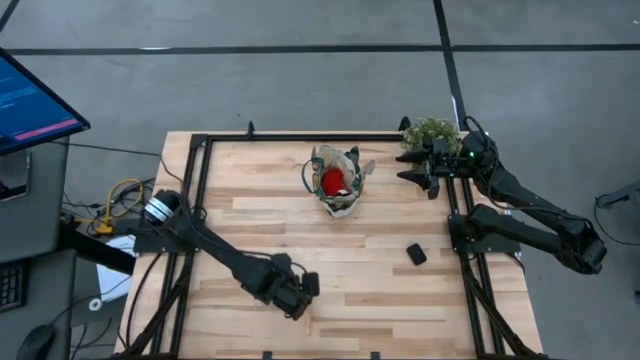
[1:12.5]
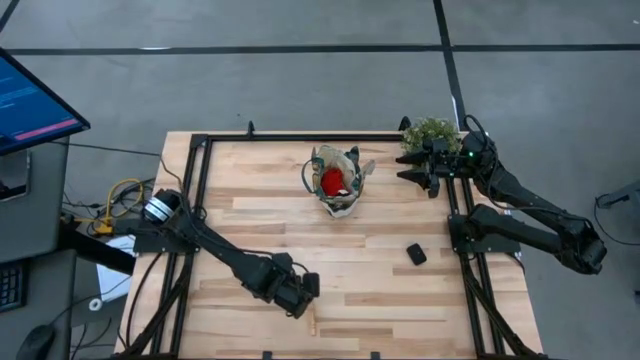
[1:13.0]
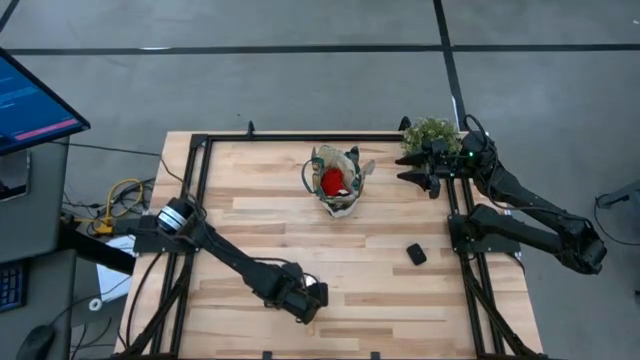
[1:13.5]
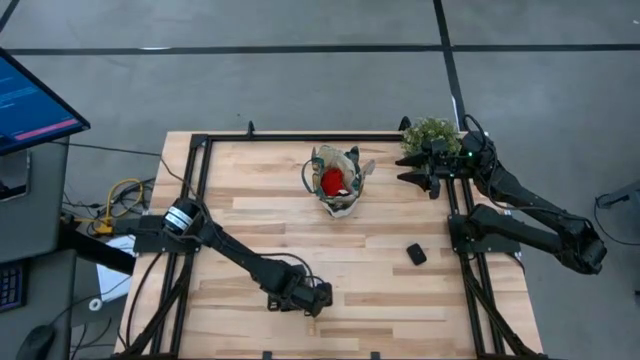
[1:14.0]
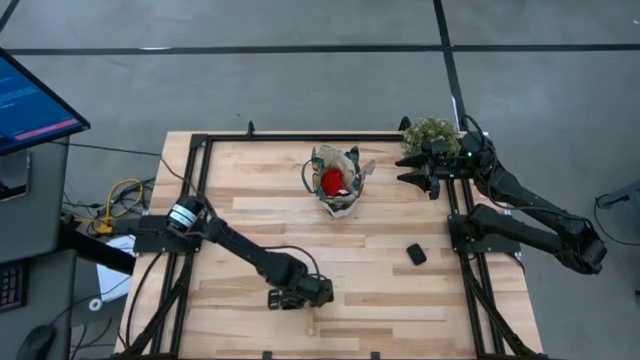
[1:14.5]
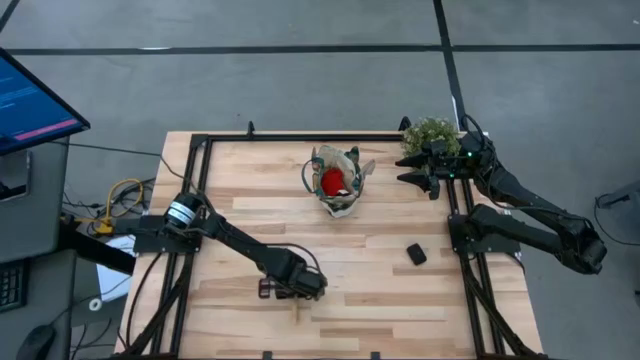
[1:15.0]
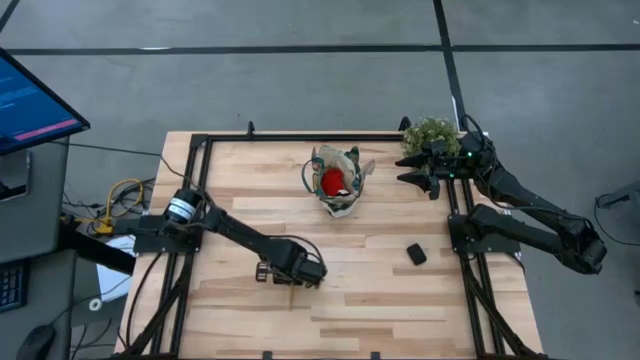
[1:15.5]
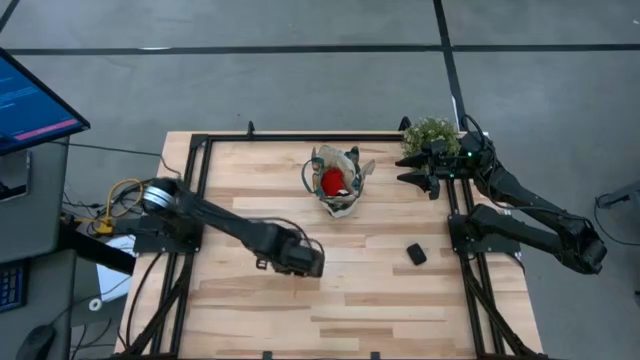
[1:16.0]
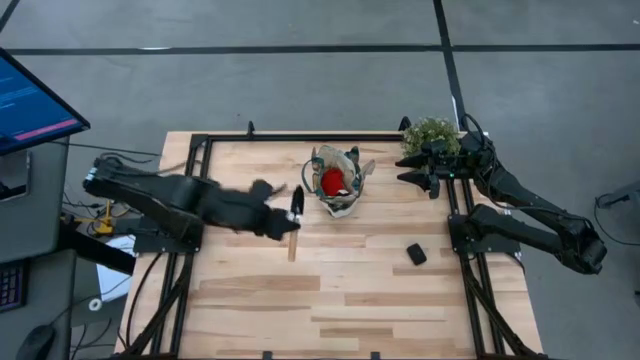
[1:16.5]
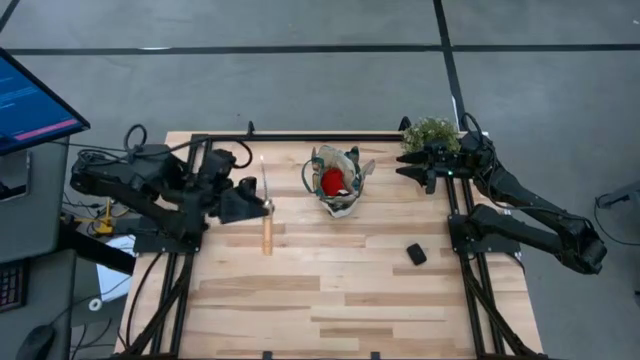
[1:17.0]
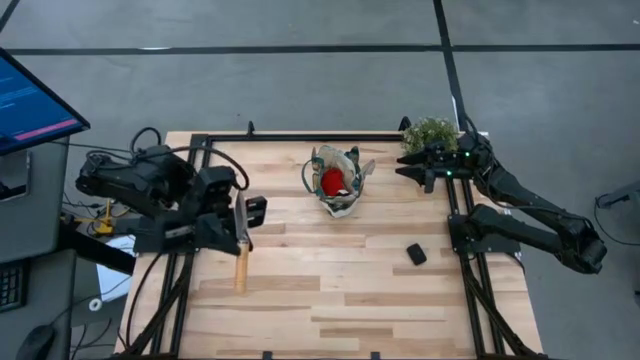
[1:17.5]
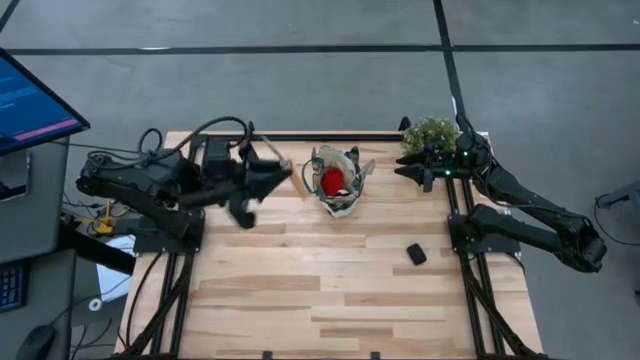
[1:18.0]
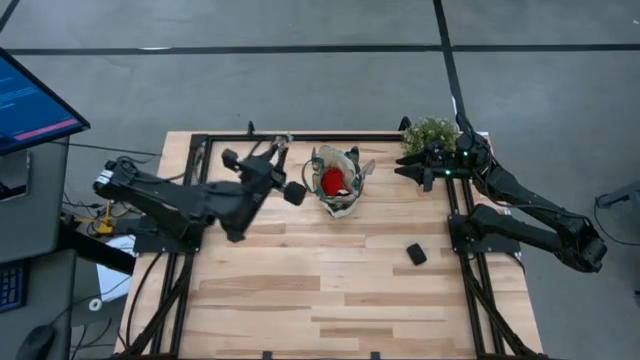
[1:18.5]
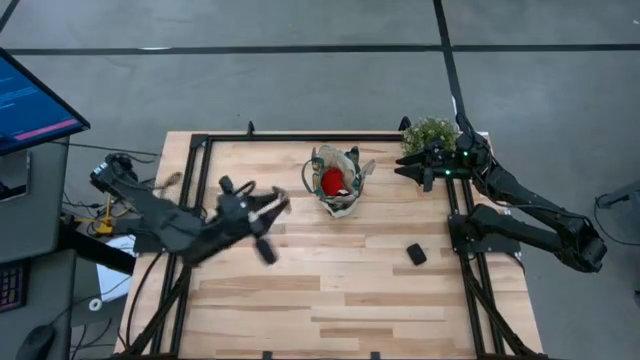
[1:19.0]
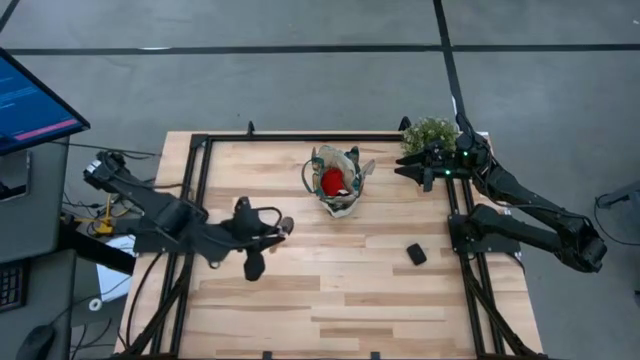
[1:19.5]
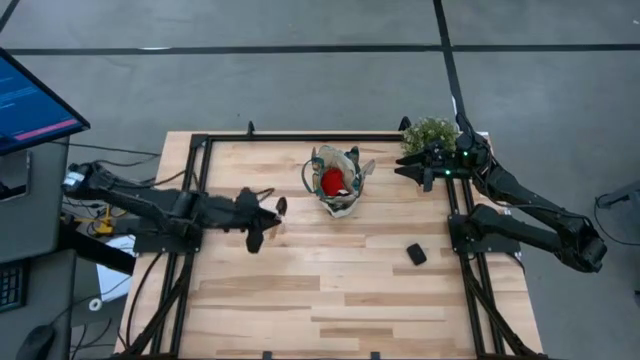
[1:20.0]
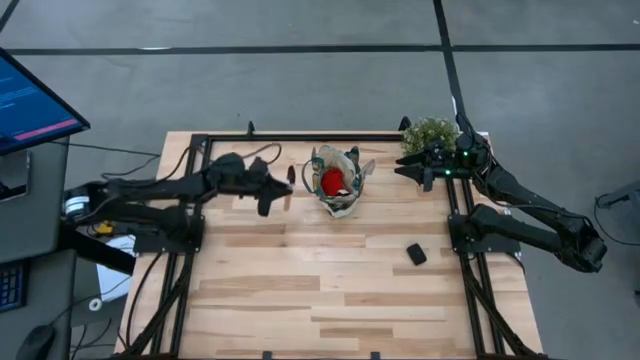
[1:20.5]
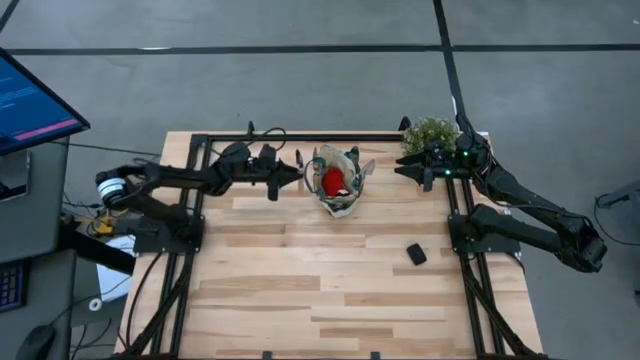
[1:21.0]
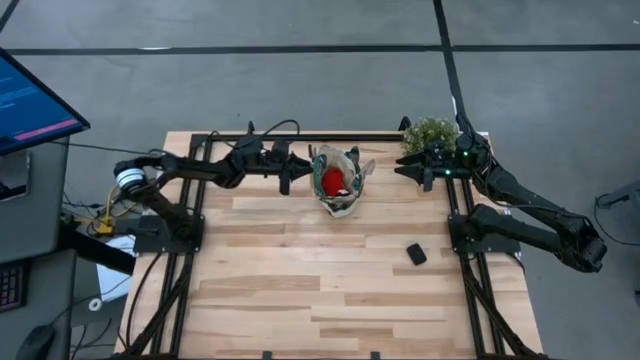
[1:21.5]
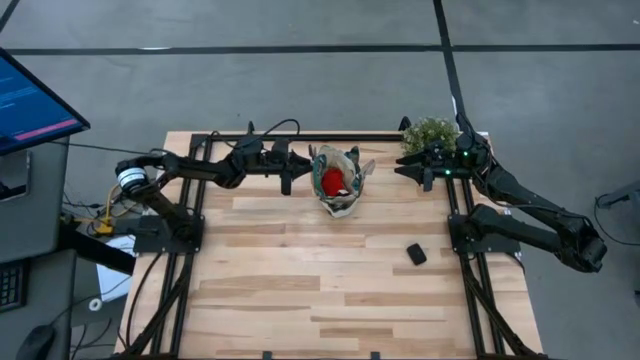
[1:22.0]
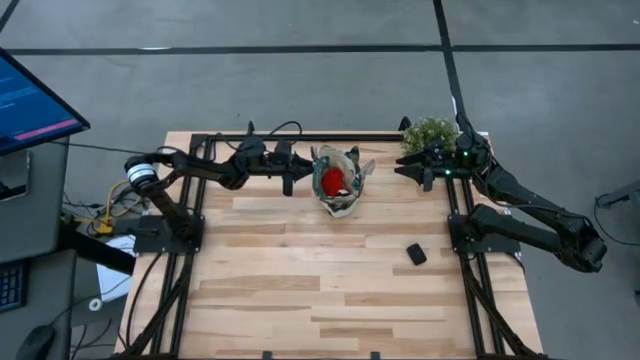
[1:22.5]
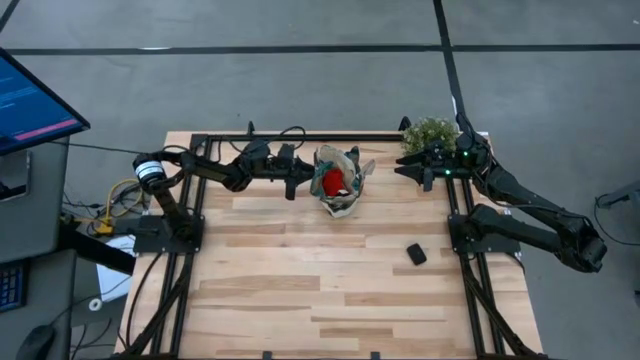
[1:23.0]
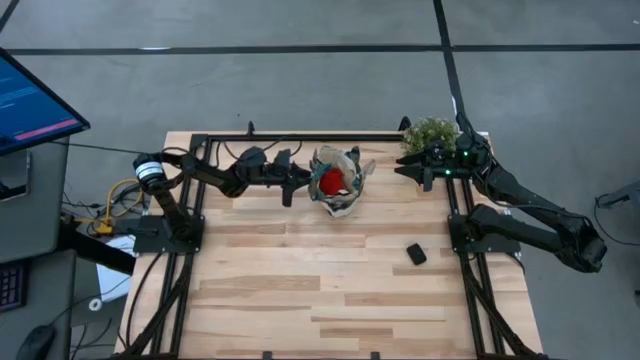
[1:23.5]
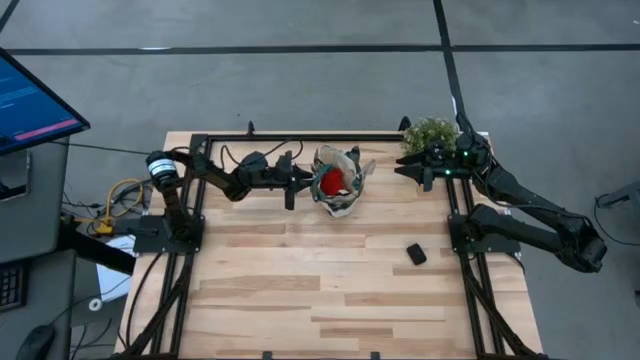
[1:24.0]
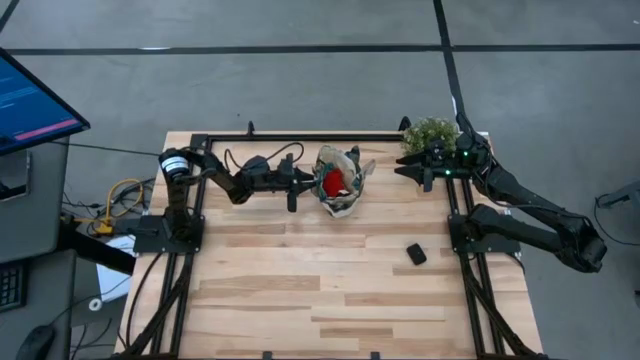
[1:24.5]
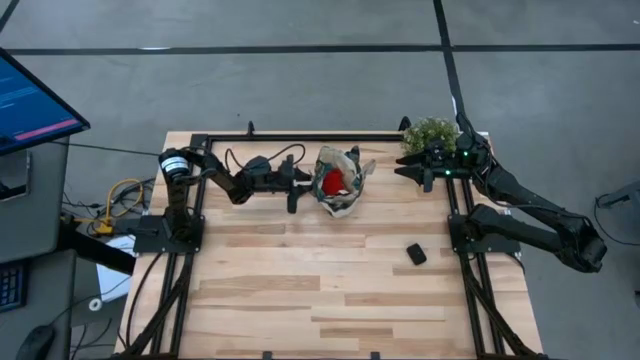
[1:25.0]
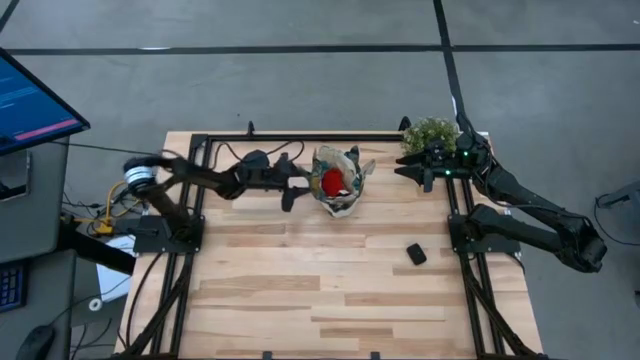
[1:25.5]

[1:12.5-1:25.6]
Task: Pick & Place Garden tools in Gardening bag
Put the brown trowel into the green gardening bag

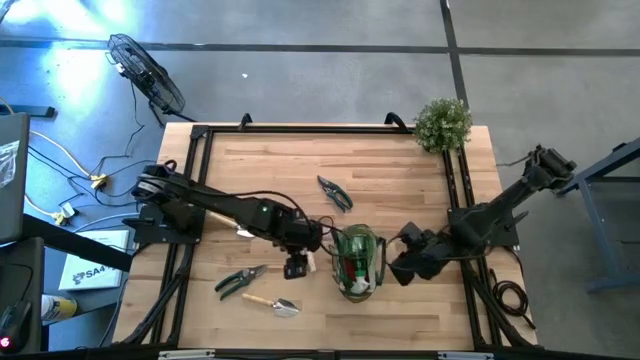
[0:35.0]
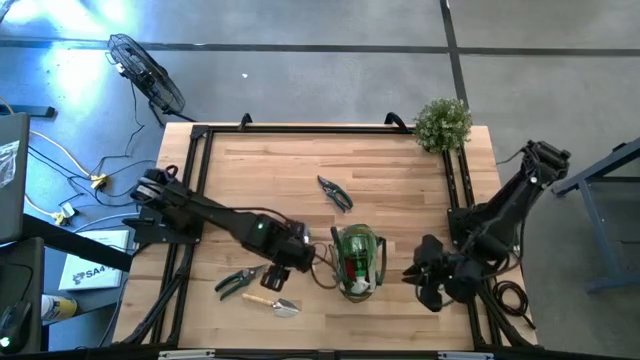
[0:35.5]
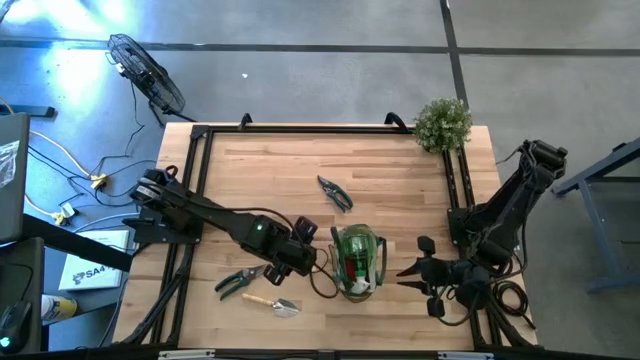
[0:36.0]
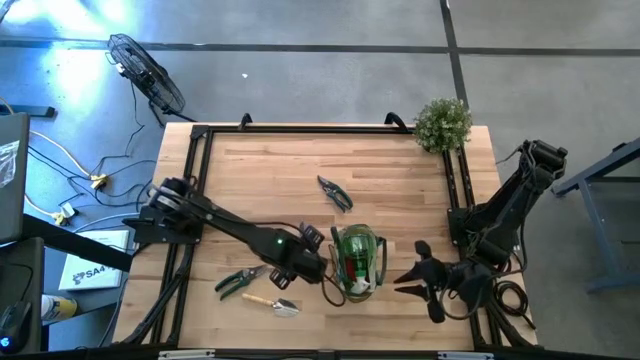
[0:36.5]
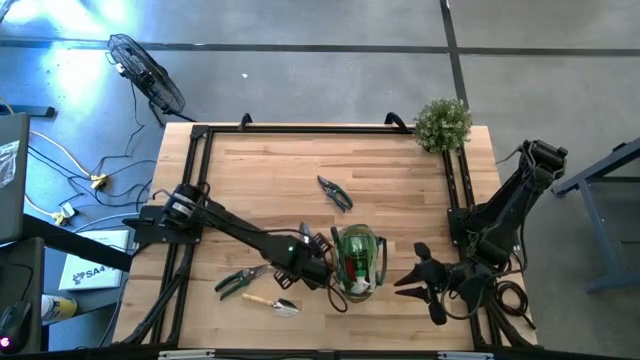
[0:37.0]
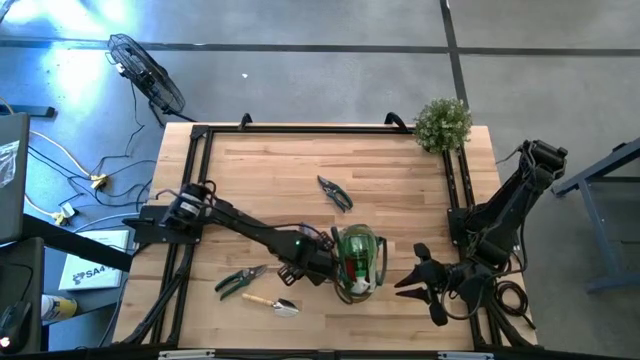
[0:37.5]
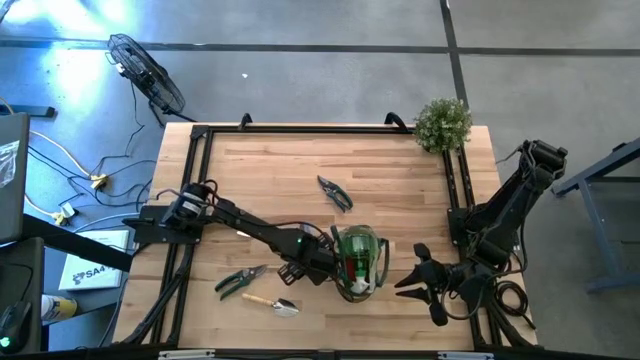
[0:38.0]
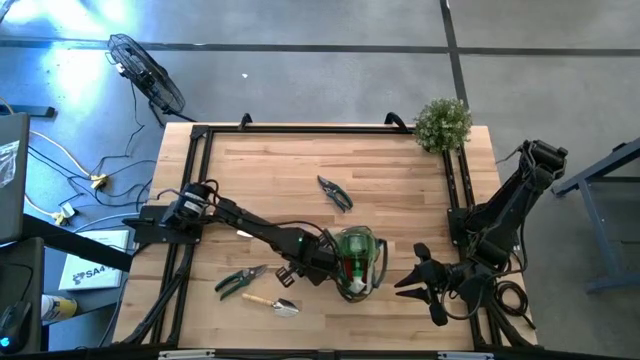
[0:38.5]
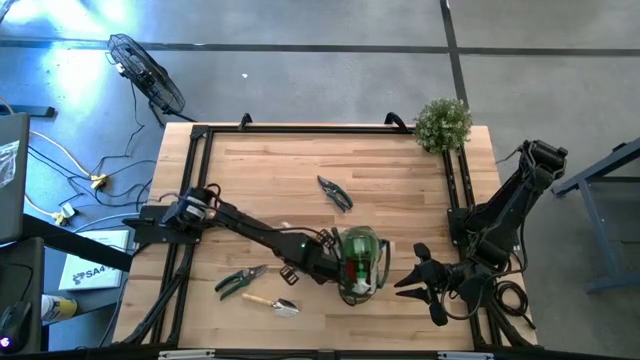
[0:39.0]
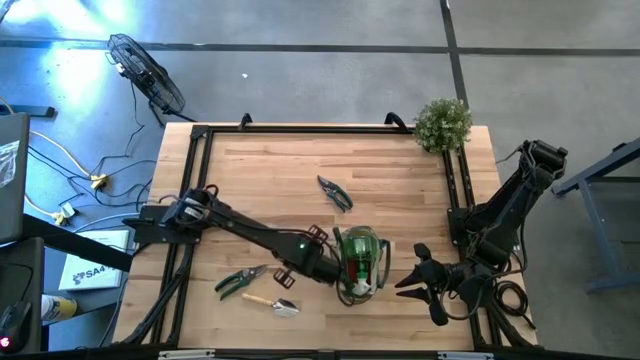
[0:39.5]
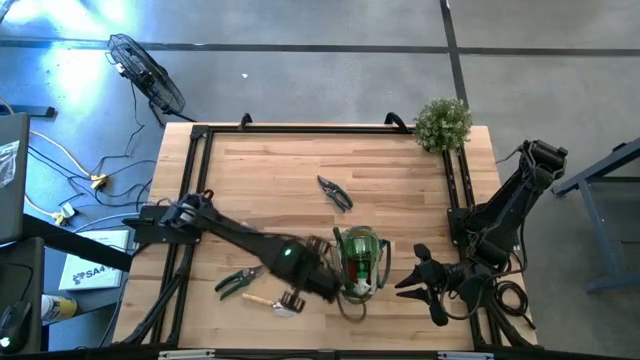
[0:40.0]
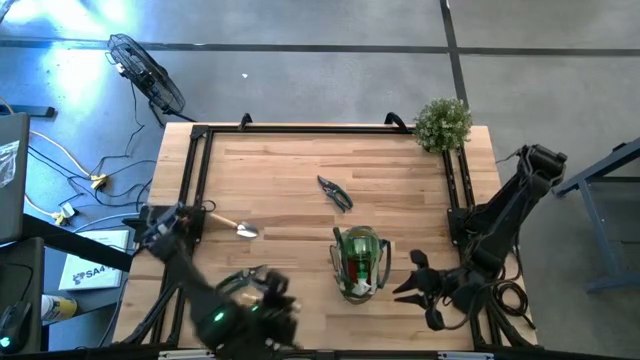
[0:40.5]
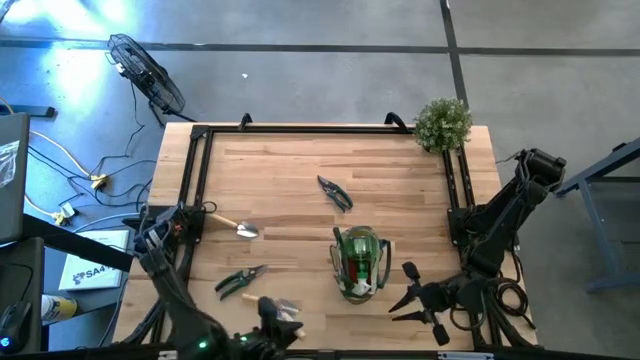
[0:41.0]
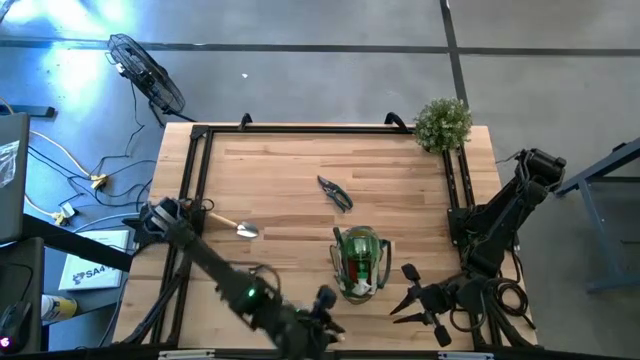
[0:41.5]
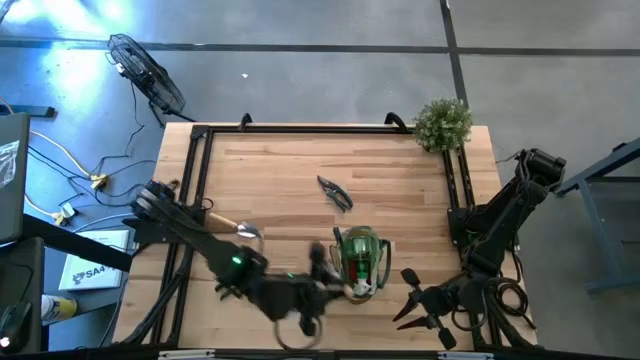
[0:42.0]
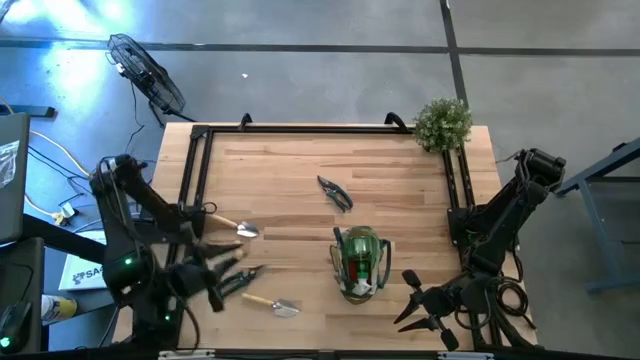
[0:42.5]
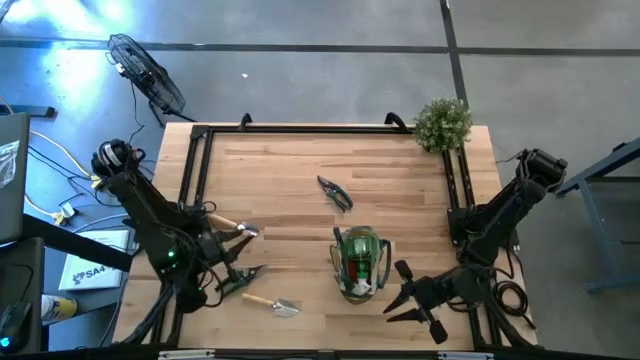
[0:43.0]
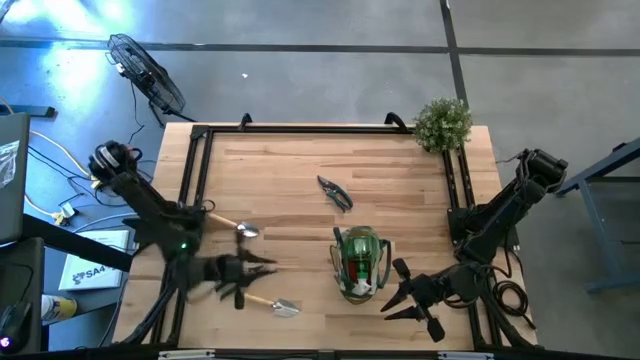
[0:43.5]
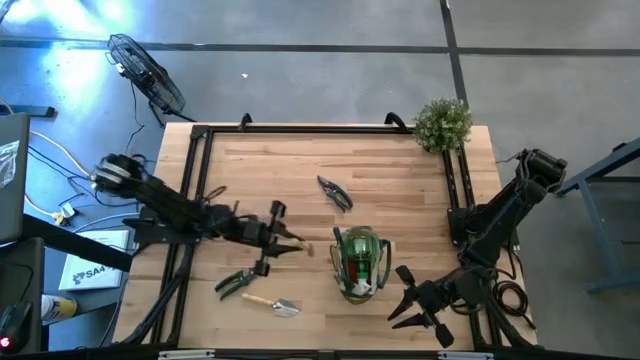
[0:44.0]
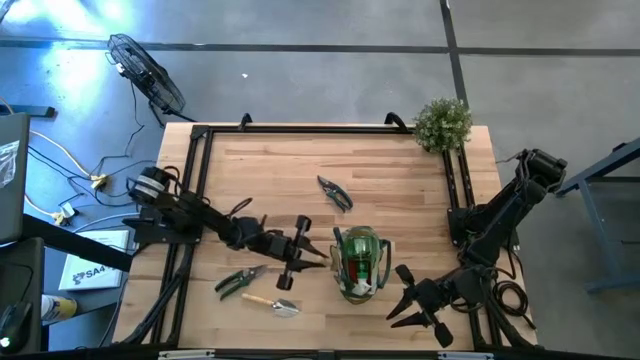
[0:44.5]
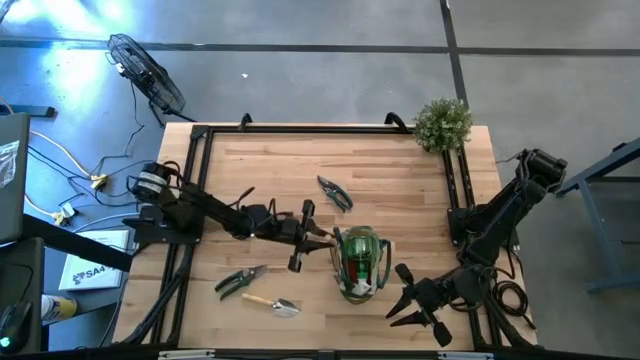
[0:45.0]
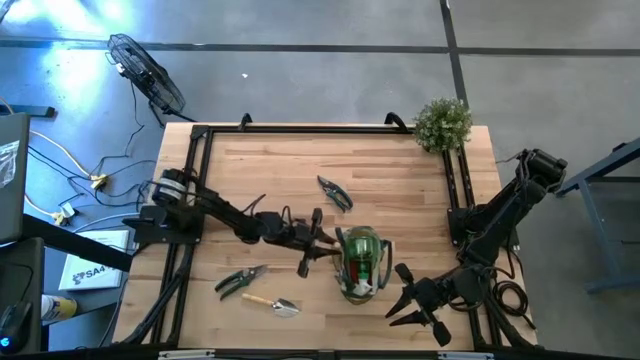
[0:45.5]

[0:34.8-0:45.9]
Task: Pick & Place Garden tools in Gardening bag
Put the top right brown trowel into the gardening bag
